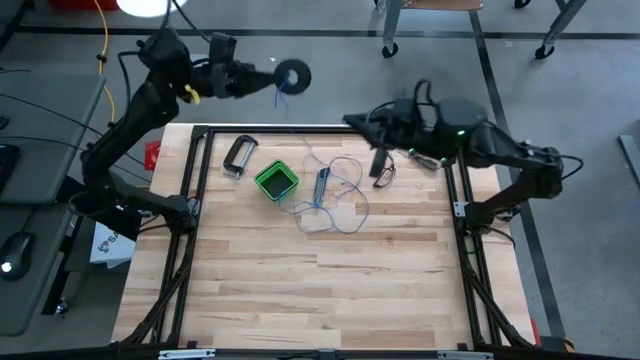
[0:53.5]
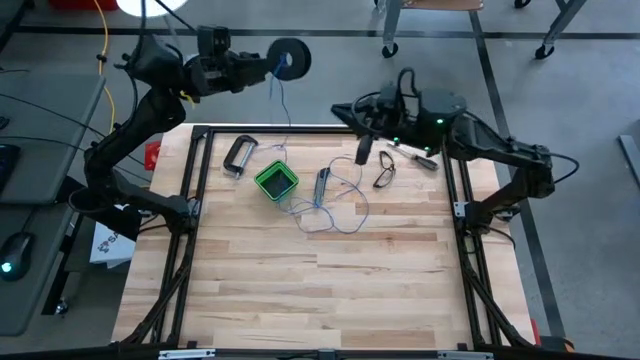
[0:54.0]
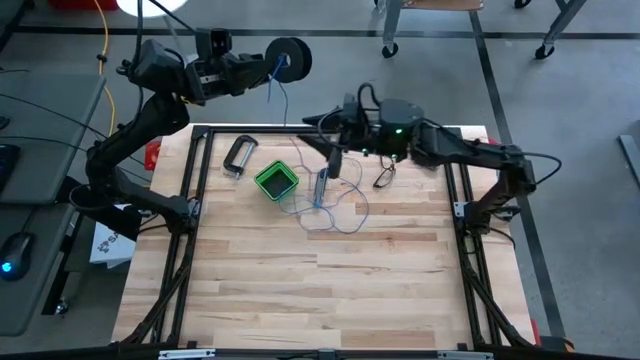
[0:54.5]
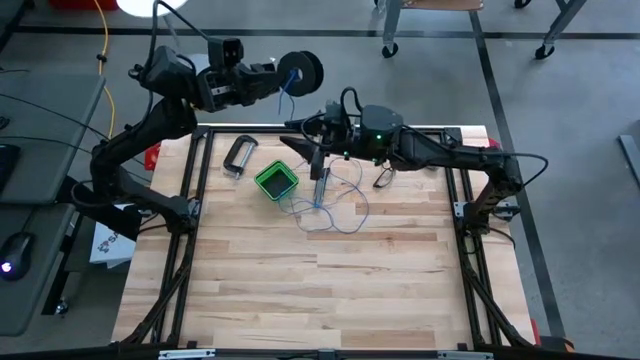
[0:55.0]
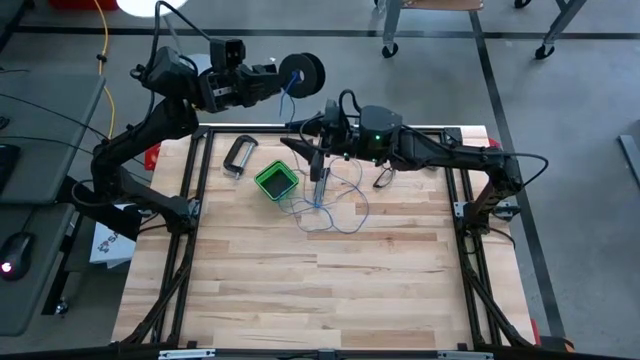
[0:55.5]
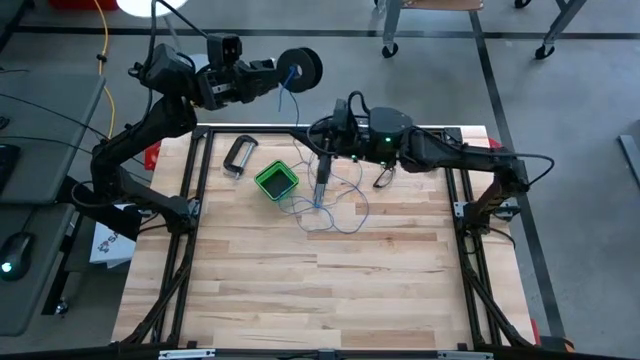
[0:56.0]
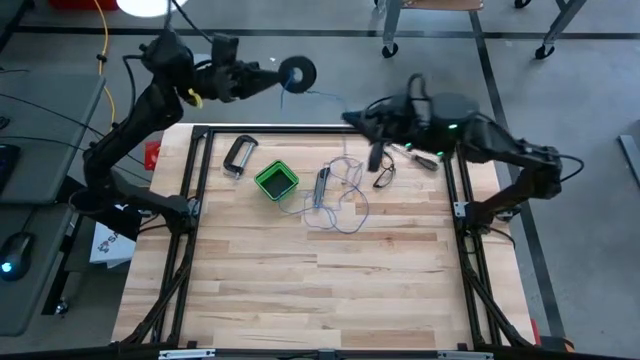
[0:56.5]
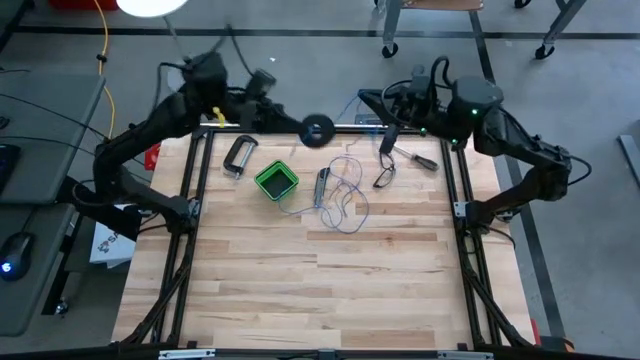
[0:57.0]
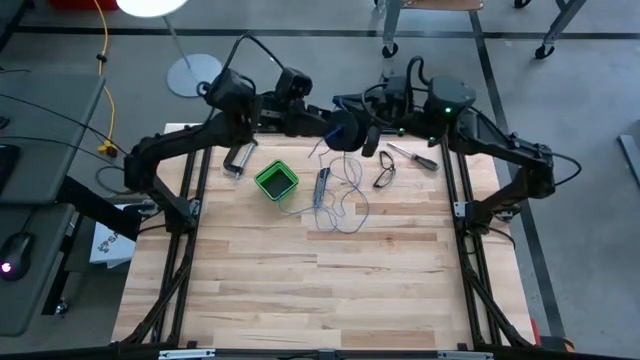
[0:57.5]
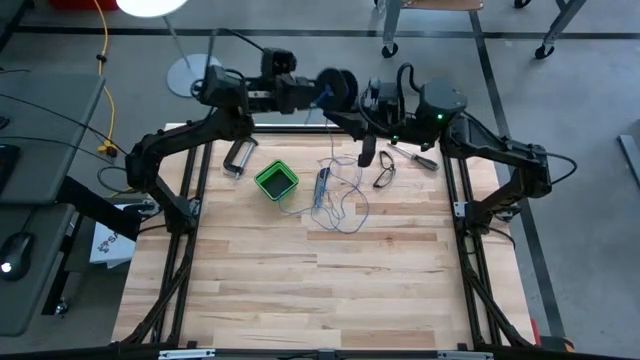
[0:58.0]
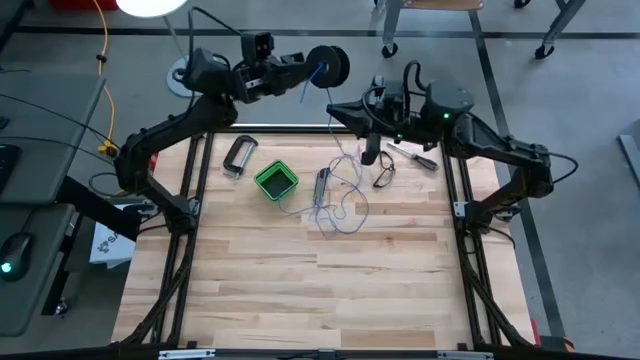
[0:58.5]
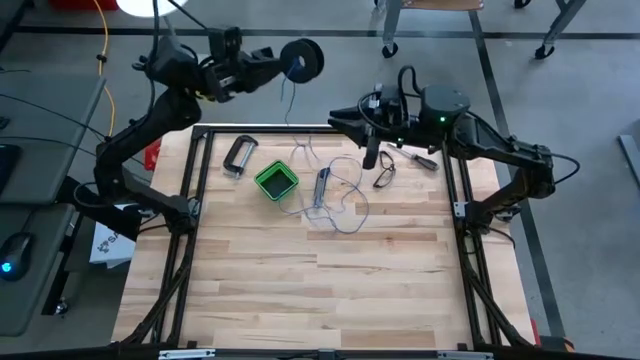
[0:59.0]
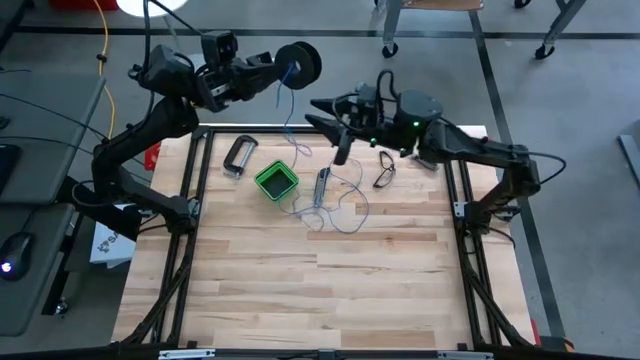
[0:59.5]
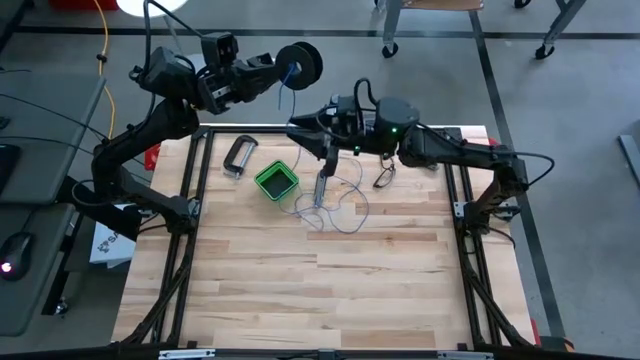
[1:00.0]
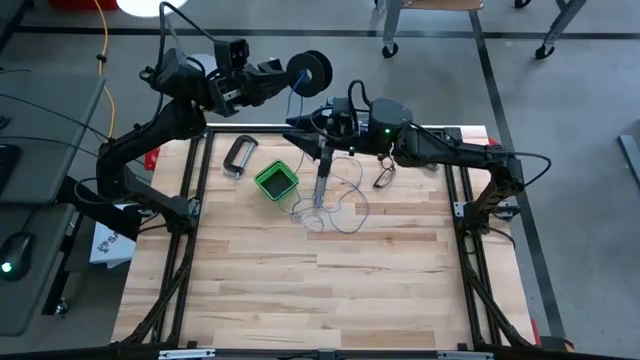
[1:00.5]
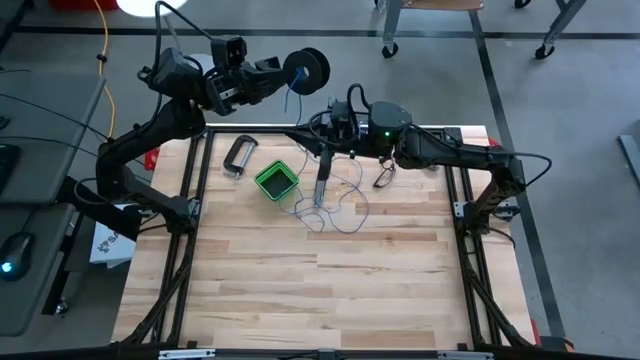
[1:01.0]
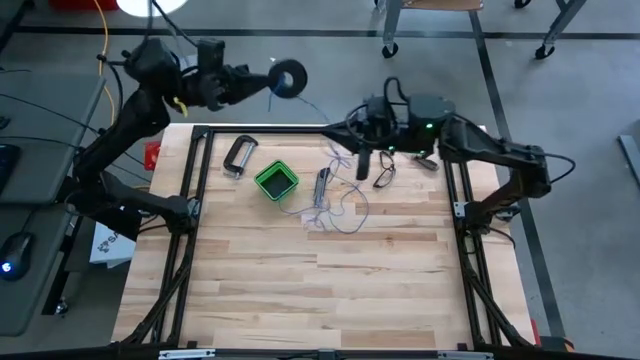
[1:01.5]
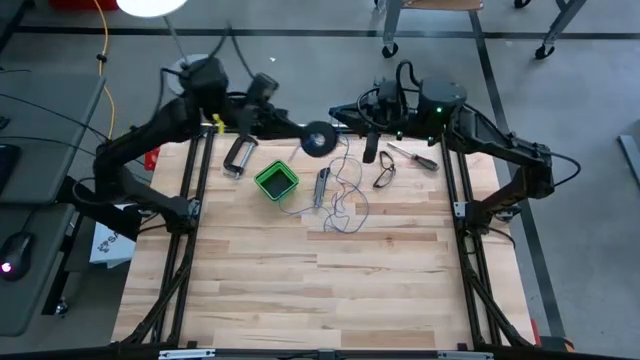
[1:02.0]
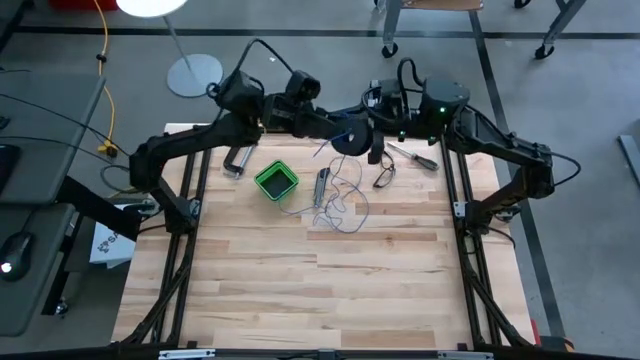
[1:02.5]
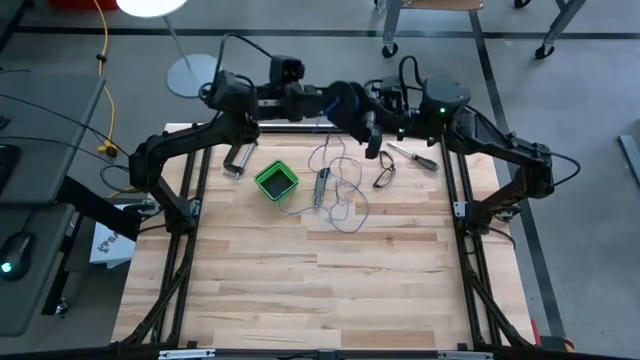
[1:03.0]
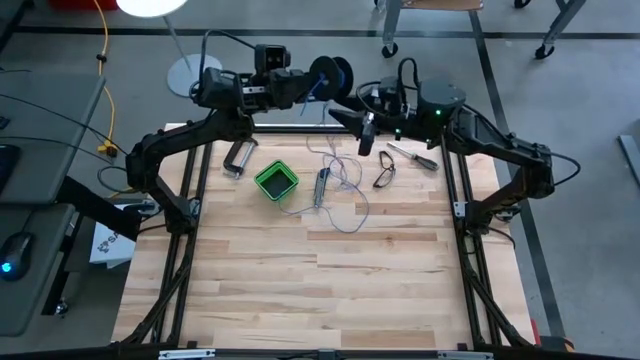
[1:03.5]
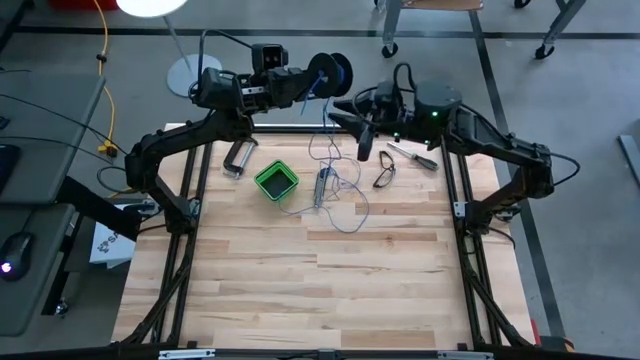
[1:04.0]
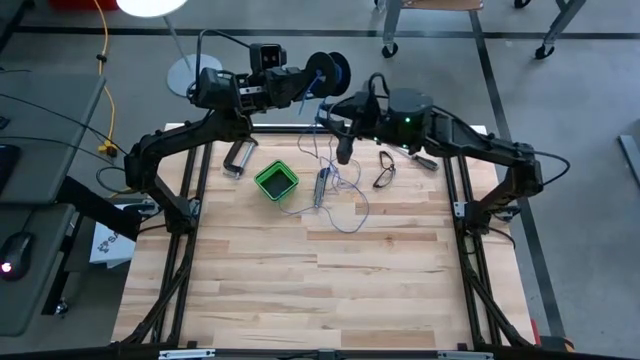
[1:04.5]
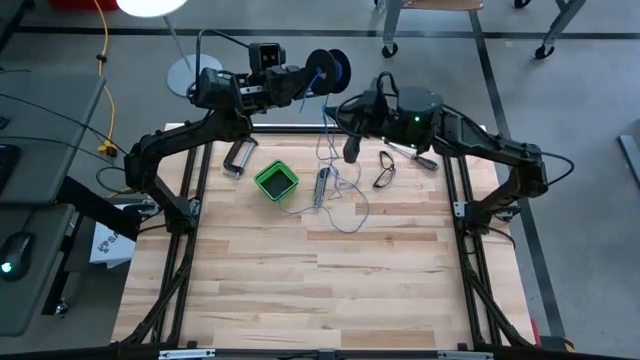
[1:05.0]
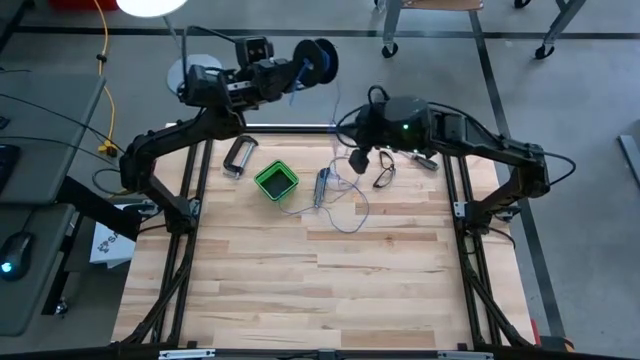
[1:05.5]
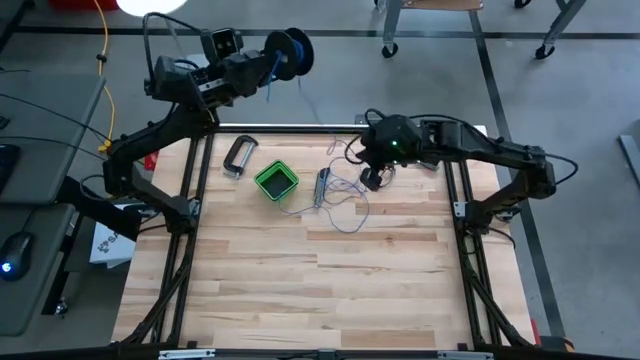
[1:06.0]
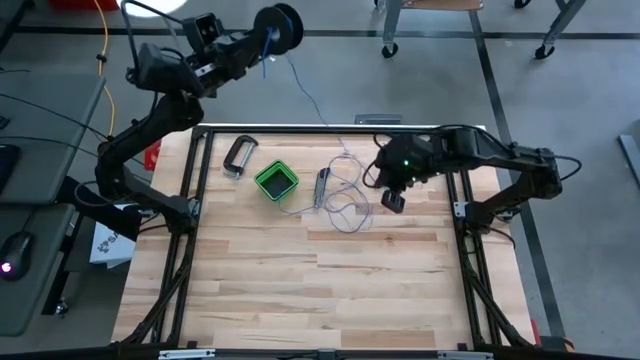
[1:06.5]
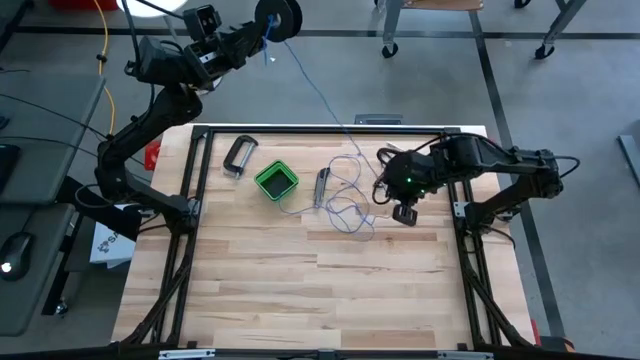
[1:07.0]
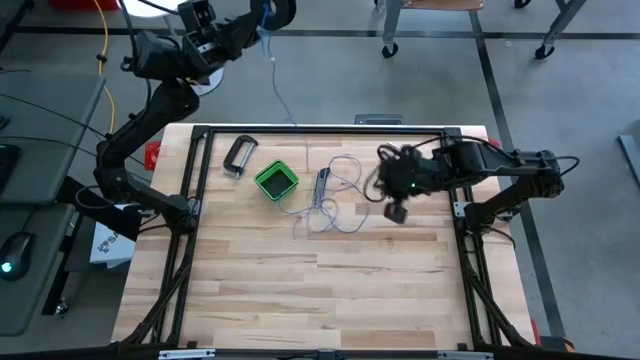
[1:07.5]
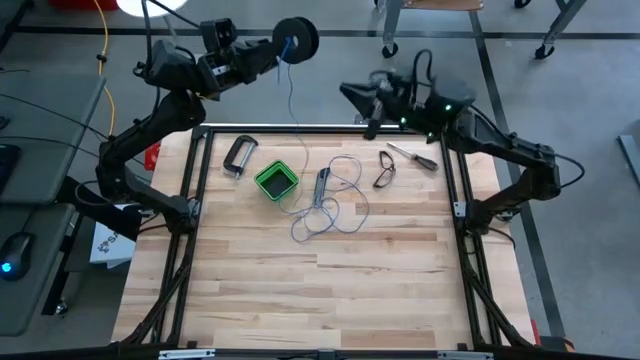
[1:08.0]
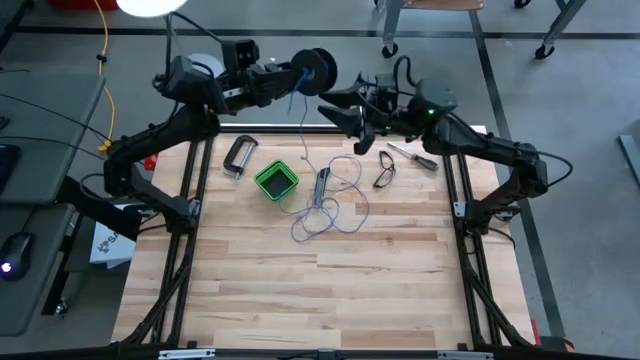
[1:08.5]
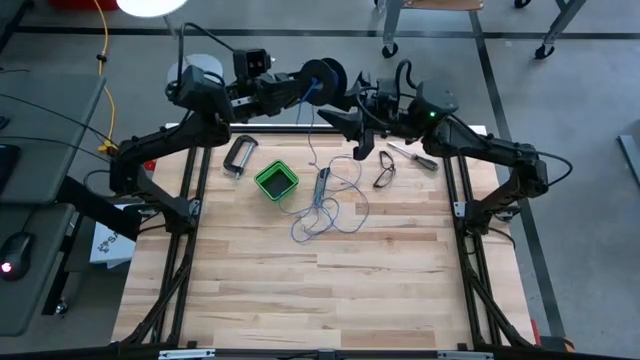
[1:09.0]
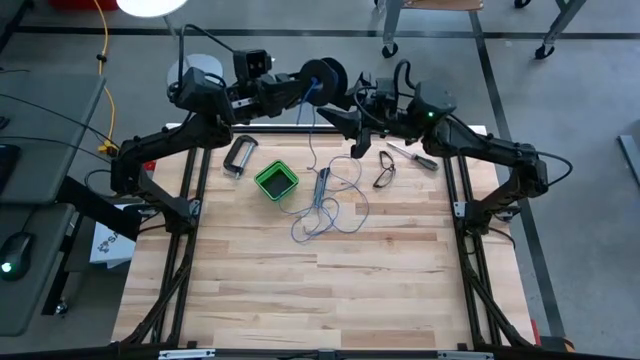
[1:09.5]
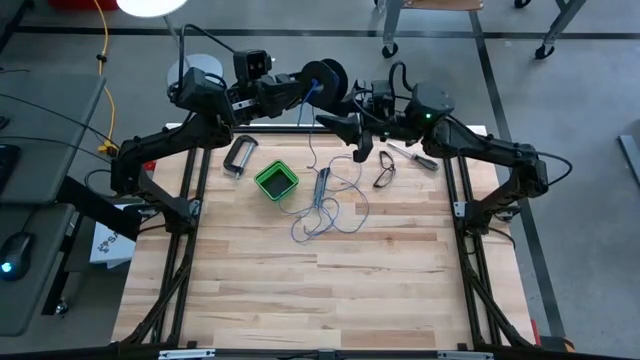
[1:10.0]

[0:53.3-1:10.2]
Task: Coil cords
Coil the blue wire onto the spool

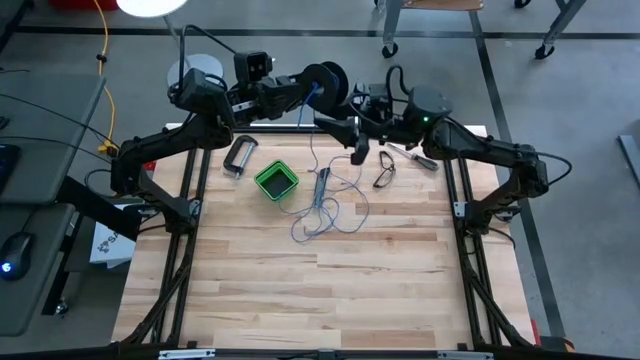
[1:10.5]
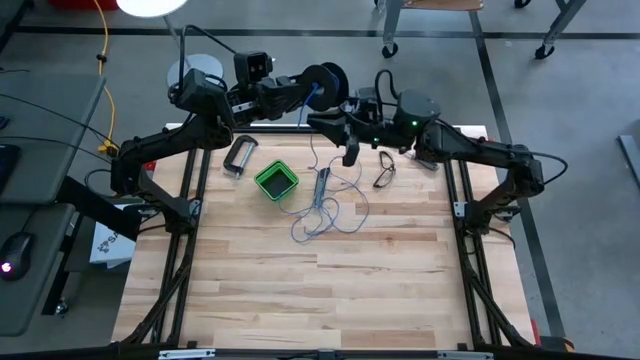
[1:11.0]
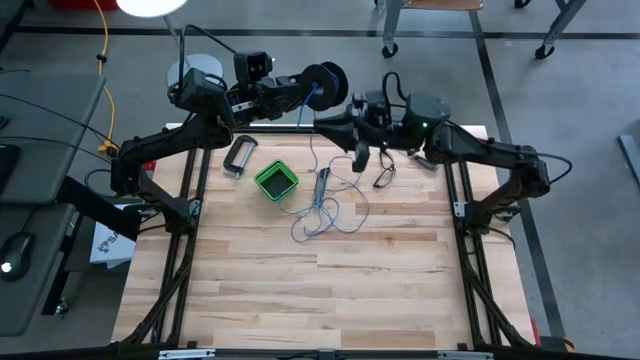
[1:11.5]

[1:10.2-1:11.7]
Coil the blue wire onto the spool

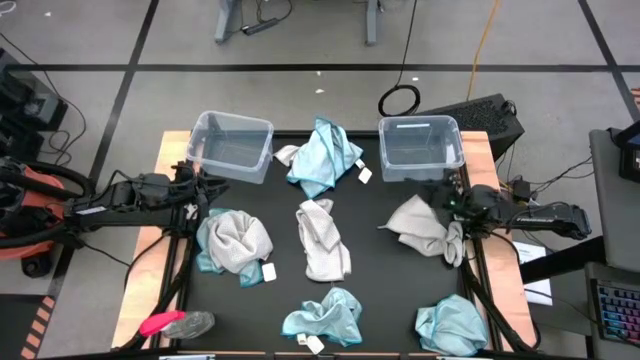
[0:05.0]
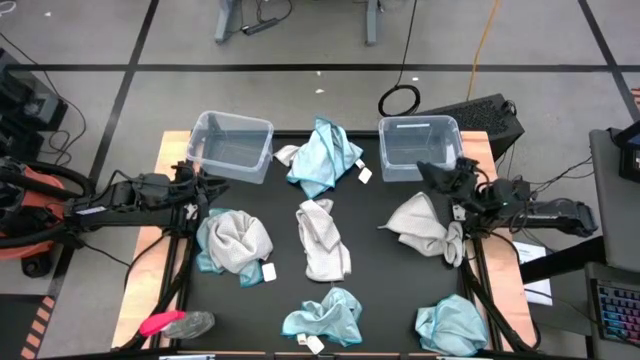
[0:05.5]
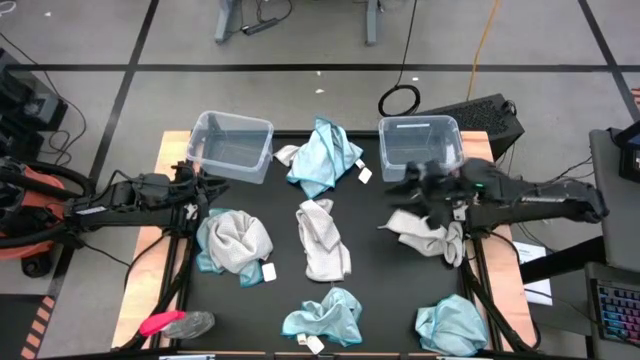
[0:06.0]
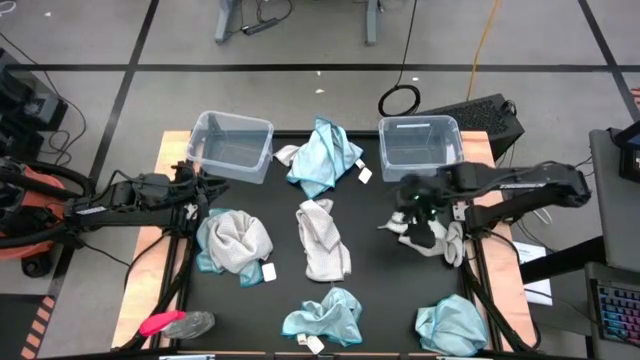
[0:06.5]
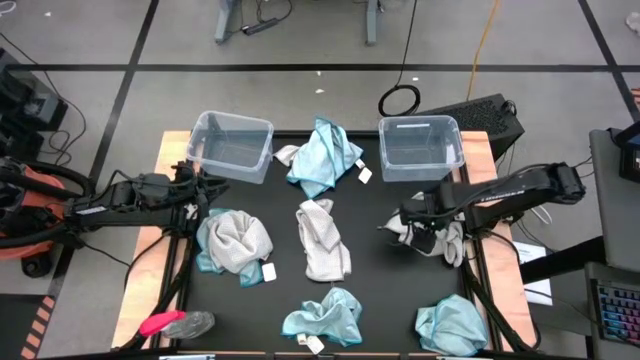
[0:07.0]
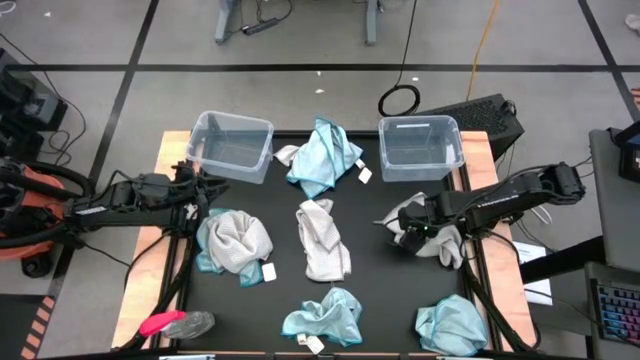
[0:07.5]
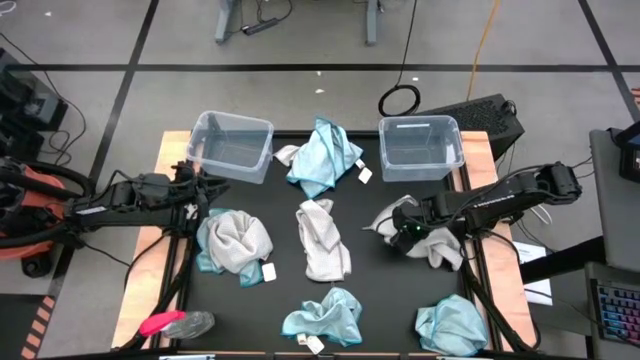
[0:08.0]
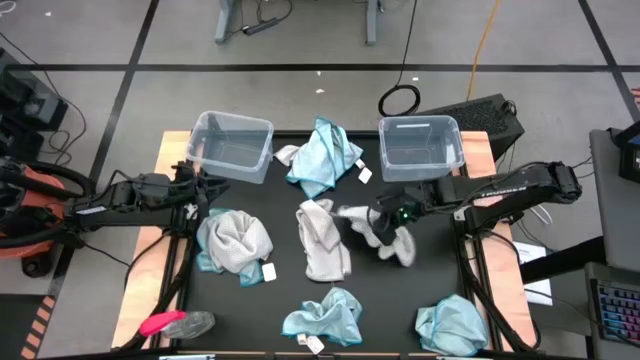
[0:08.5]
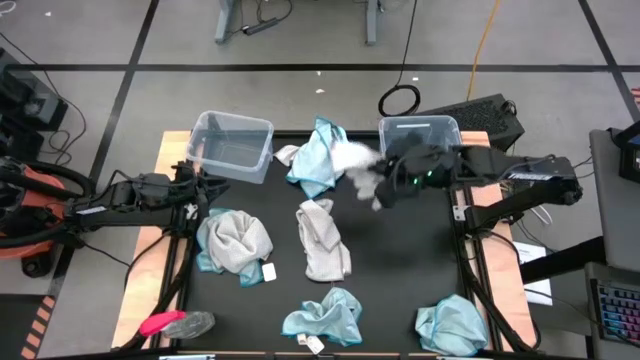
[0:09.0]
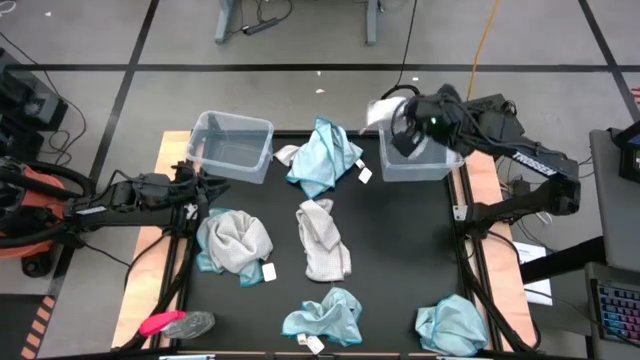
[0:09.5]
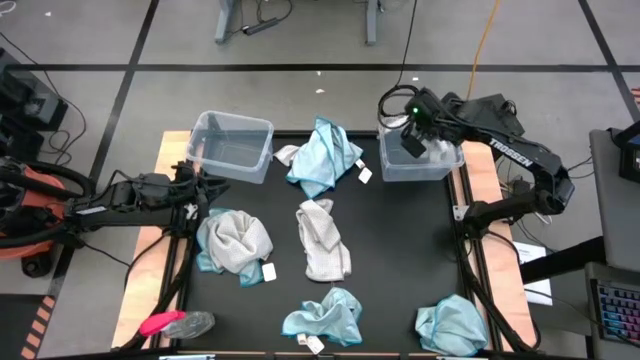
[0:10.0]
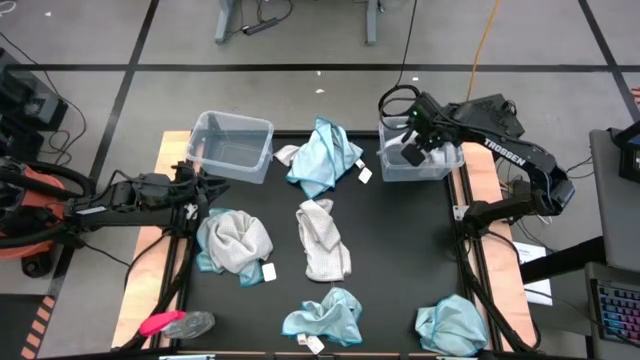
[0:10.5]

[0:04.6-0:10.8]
Task: Sort microfiber towel by color & place in baskets
Put the gray microfiber towel into the right transparent bin
